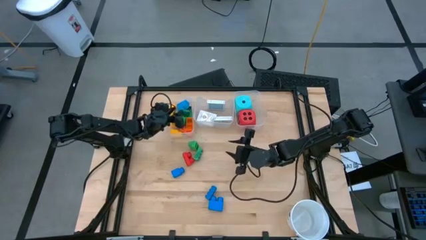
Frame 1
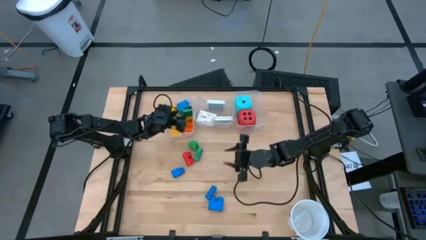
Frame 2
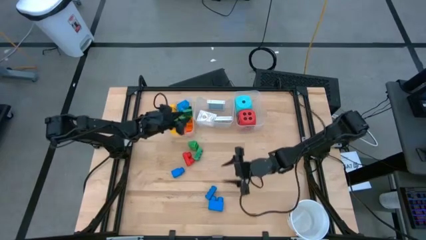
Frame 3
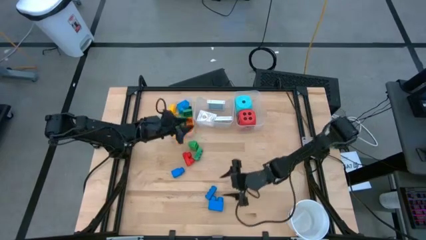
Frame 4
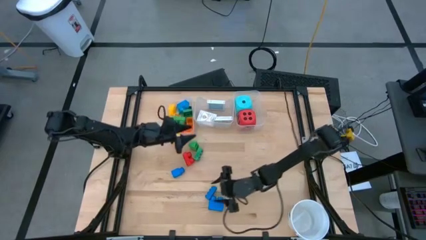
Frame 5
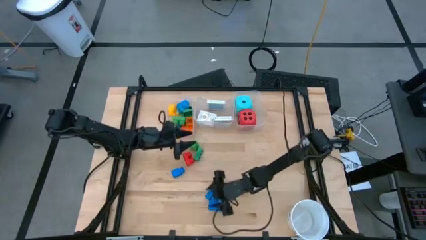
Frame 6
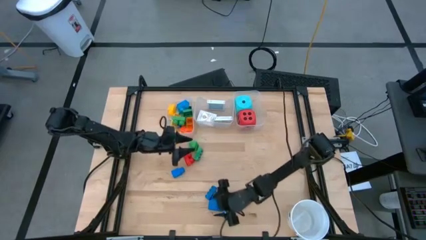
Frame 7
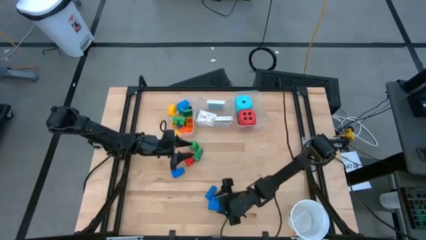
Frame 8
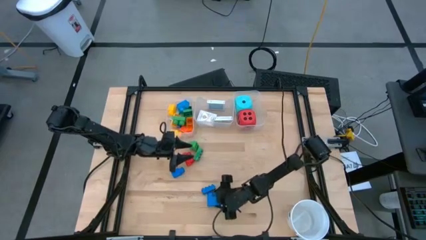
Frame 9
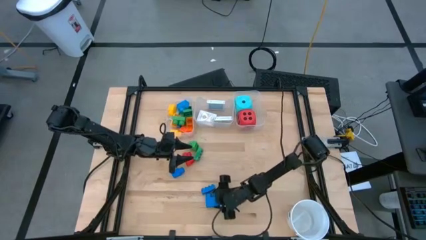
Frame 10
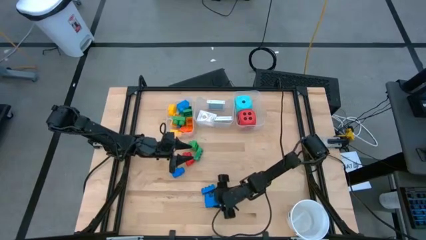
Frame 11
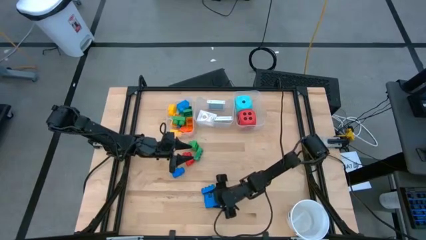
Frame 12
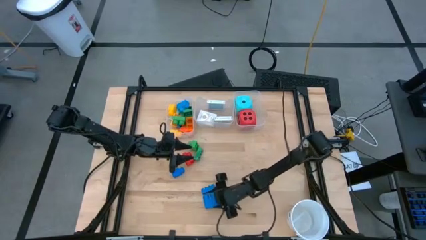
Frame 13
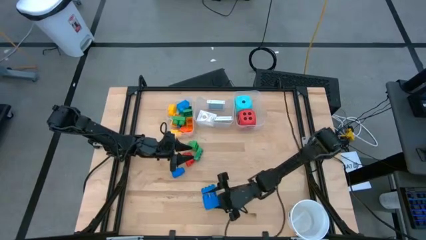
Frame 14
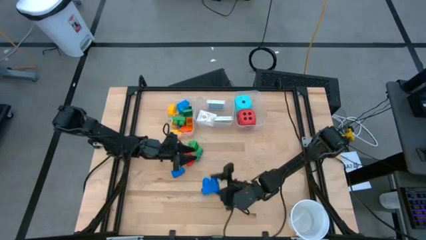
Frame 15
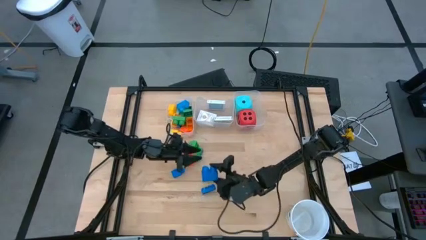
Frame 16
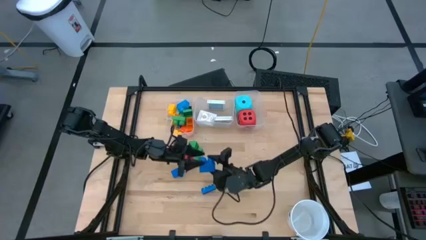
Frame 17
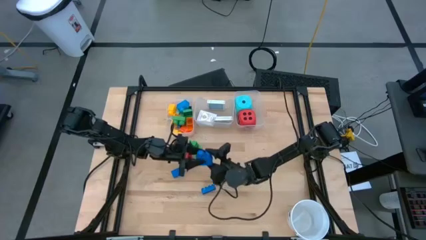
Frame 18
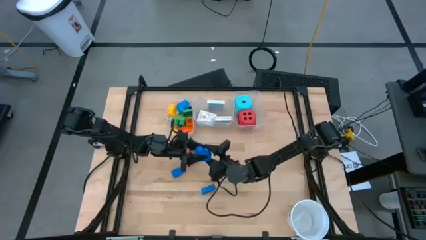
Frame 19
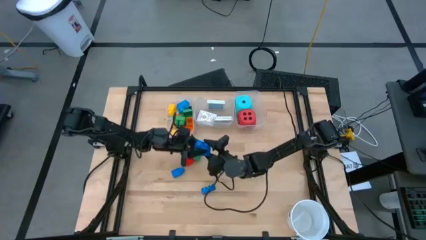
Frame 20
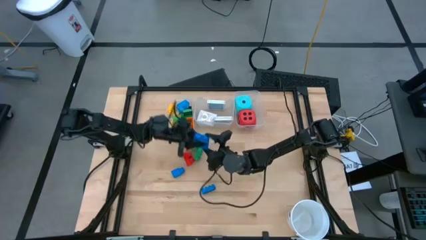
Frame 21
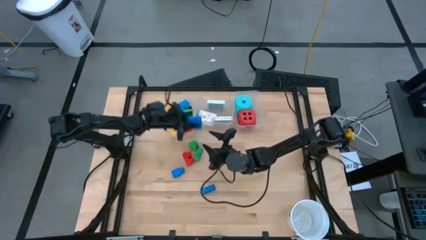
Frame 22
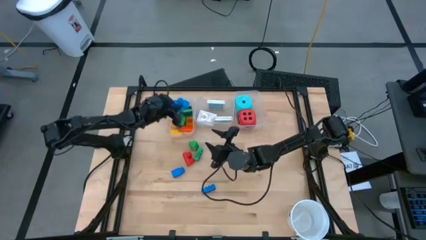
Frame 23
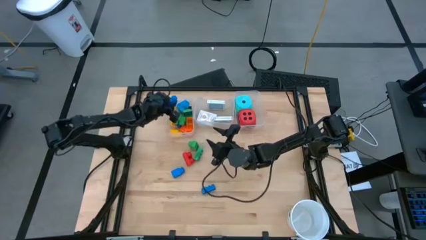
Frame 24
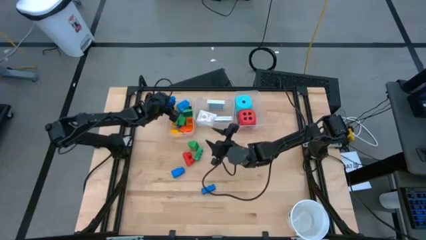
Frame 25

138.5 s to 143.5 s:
Task: Pick & Place Toys
Put the blue game piece into the left transparent bin

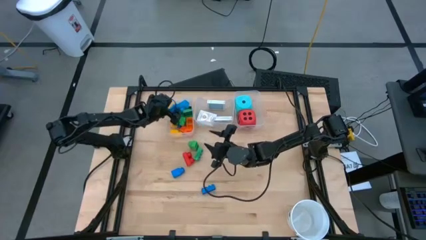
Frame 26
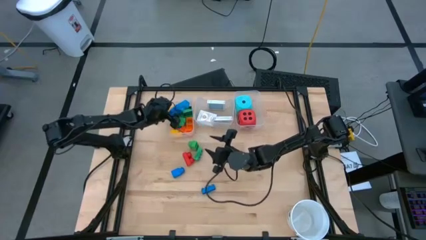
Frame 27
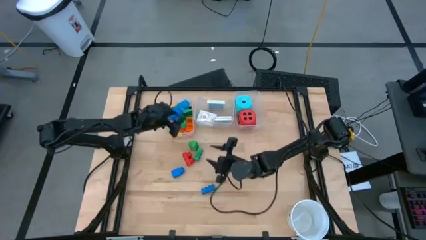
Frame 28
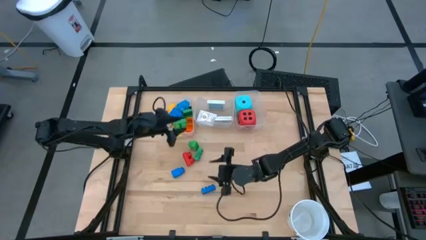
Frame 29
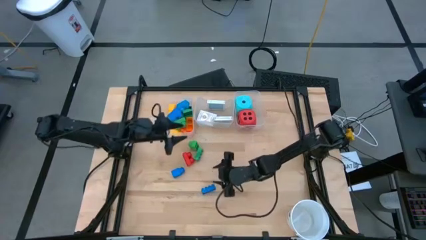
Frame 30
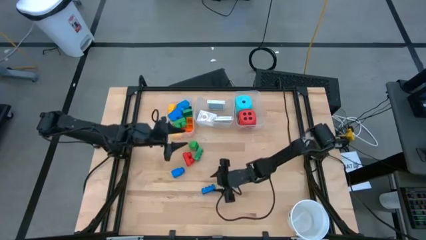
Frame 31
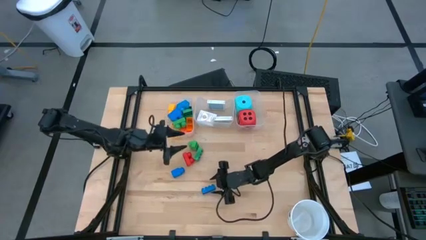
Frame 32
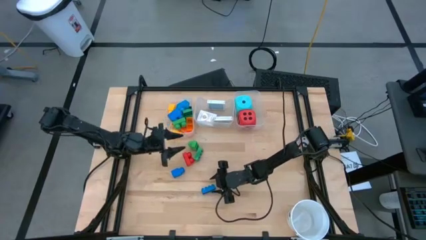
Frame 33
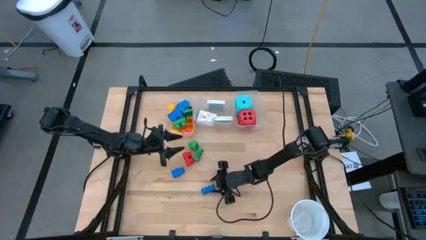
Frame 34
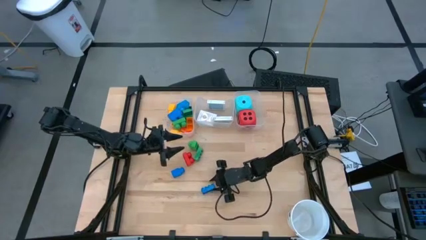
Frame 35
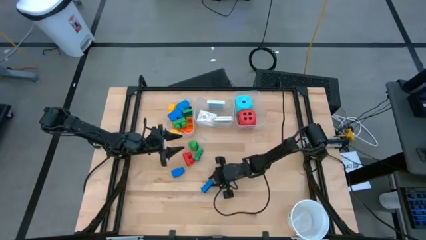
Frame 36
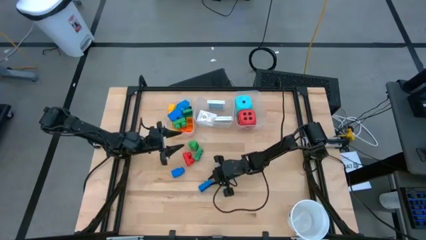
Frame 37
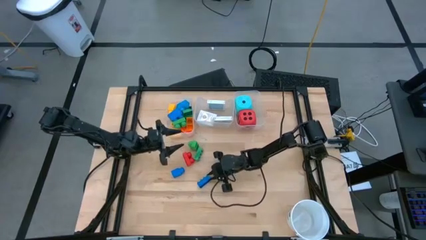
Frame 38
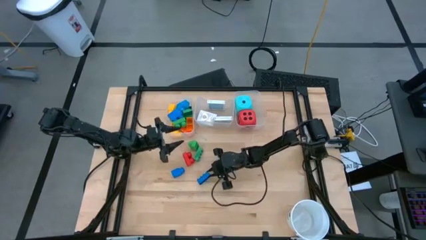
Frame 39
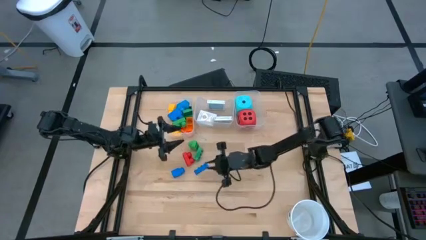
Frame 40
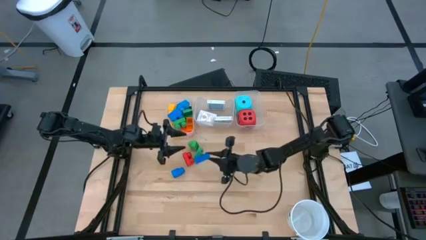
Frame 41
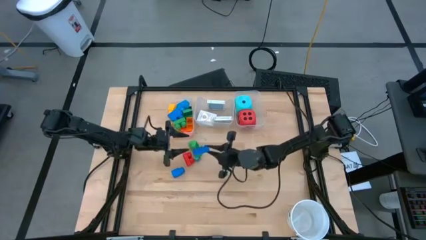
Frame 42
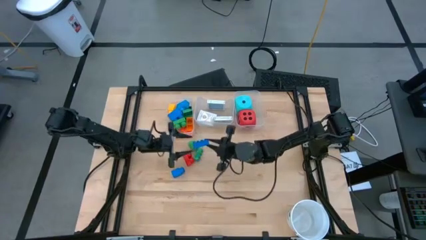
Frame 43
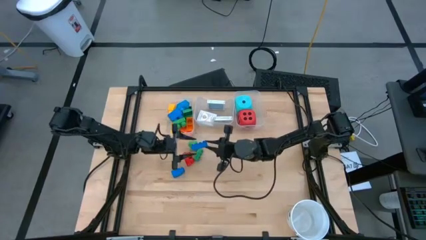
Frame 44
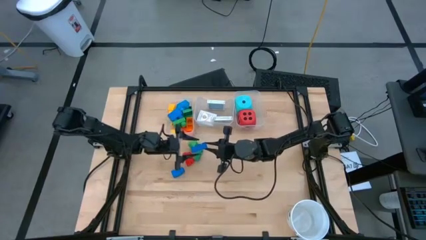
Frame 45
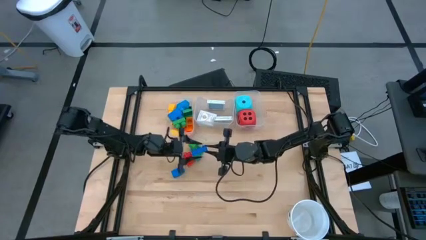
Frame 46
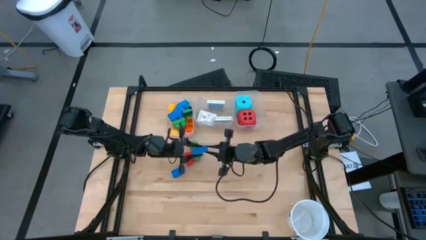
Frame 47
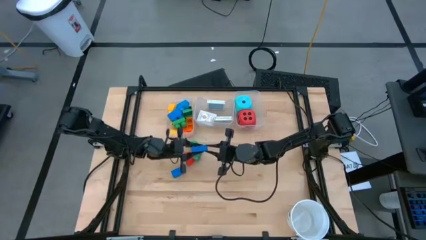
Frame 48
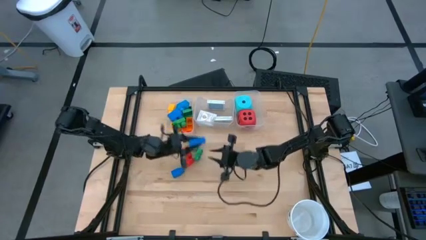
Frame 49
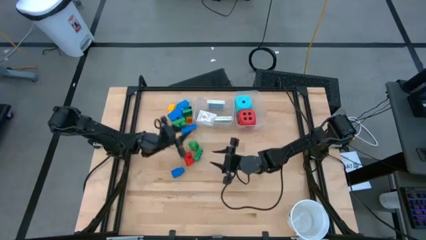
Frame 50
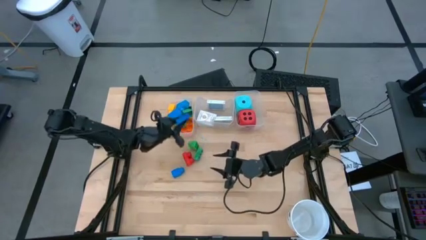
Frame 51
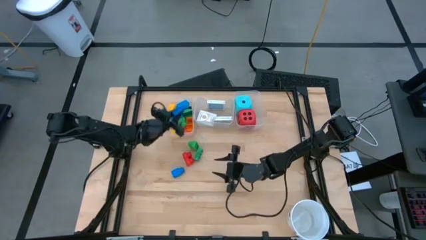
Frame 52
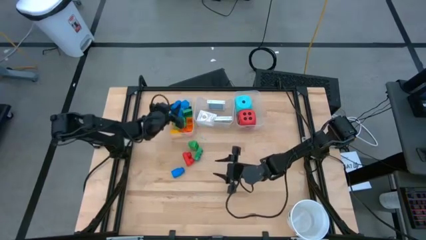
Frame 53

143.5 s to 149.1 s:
Put the blue game piece into the left transparent bin

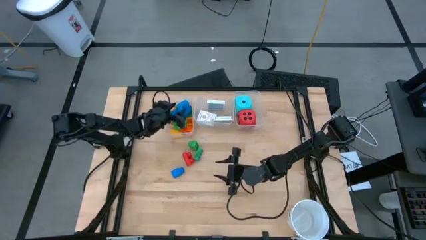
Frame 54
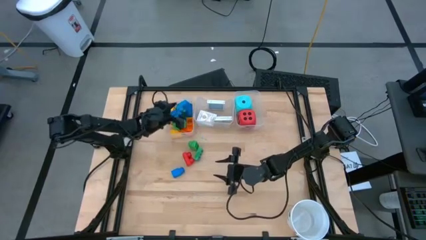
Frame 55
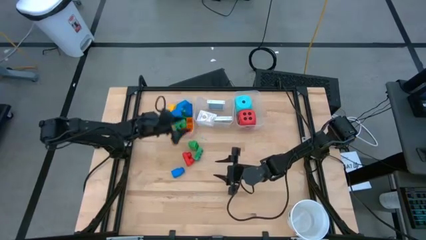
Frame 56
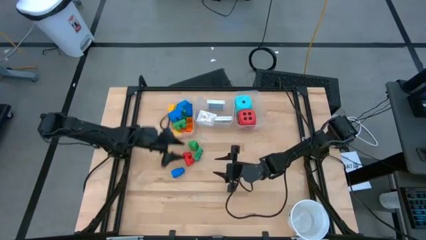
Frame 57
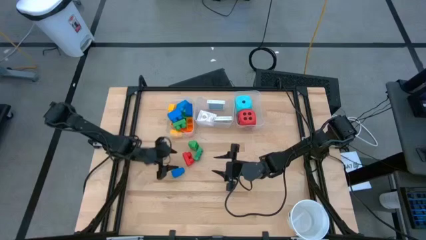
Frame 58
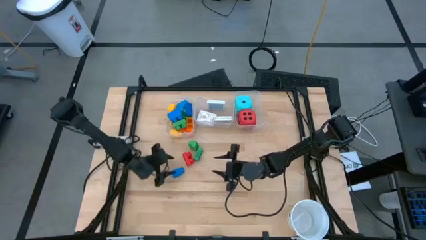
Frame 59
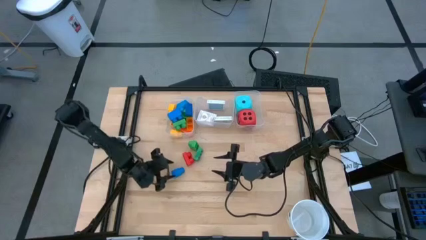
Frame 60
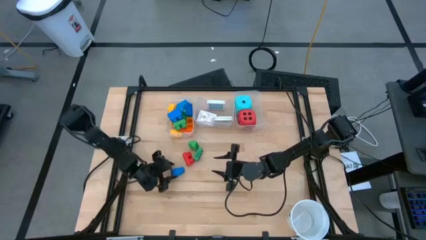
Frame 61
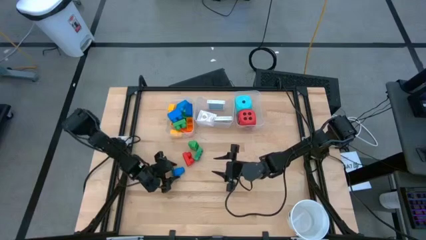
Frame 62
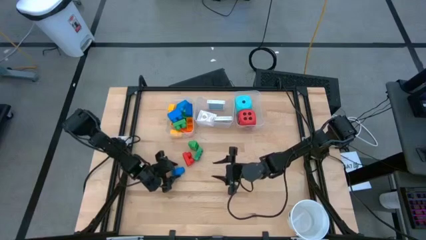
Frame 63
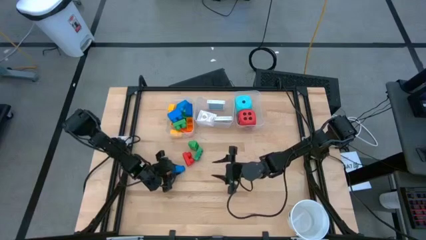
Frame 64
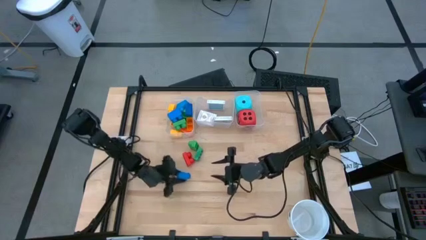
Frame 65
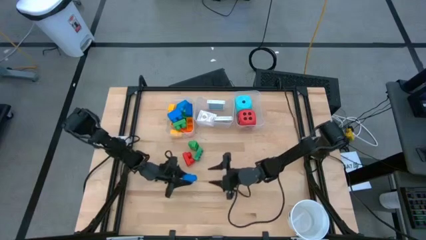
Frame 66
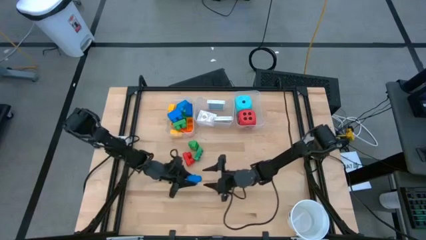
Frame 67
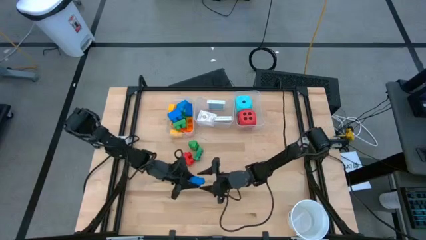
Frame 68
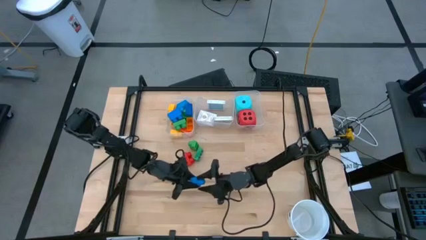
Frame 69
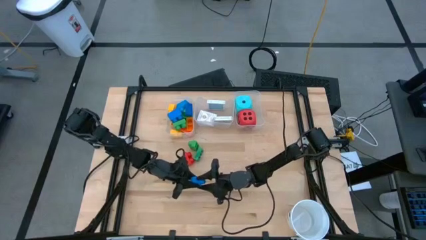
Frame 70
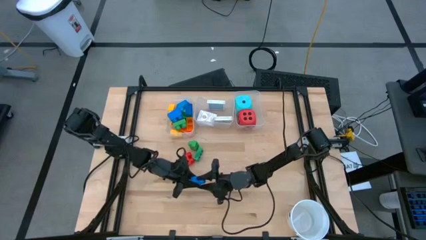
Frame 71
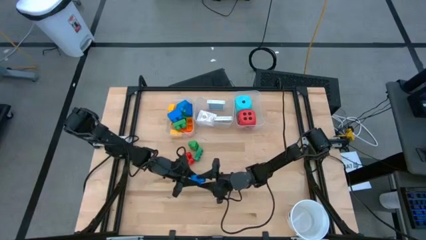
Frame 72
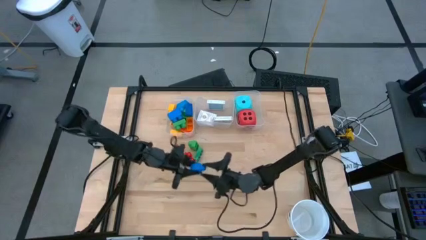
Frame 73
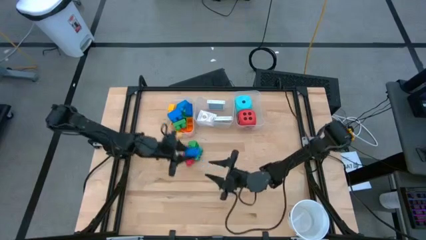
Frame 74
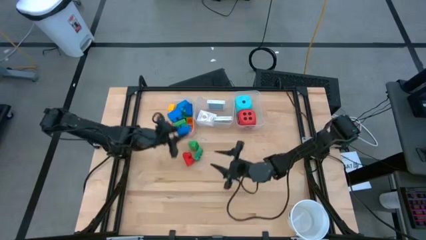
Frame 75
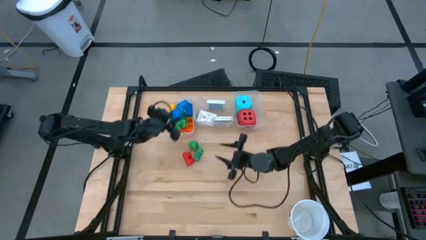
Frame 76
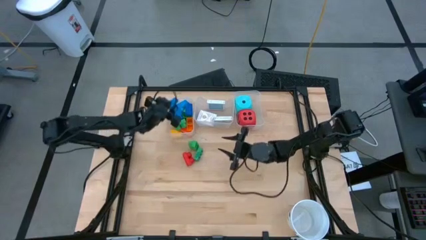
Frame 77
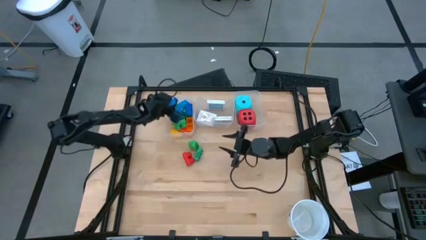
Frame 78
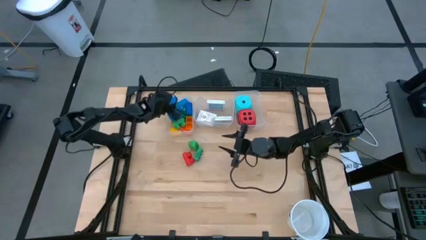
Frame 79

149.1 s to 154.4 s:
Put the blue game piece into the left transparent bin
